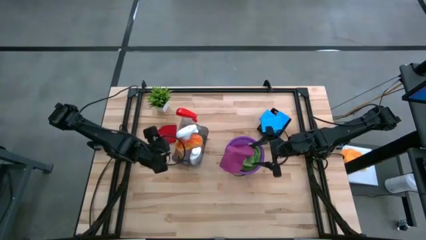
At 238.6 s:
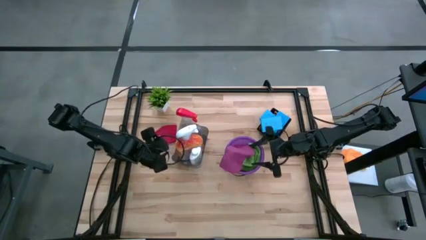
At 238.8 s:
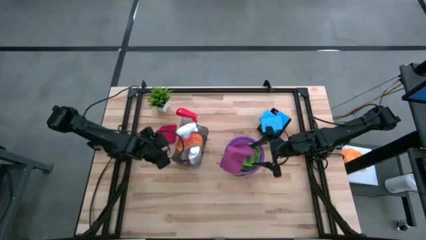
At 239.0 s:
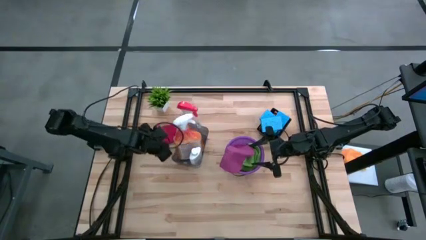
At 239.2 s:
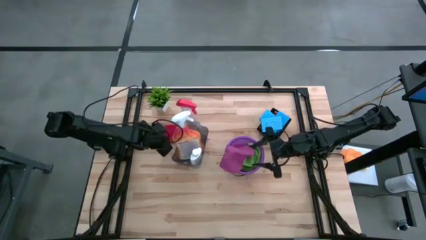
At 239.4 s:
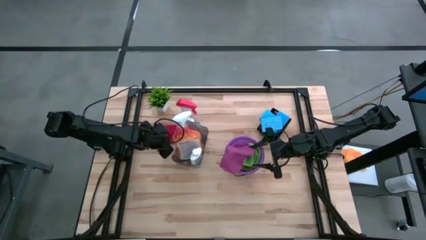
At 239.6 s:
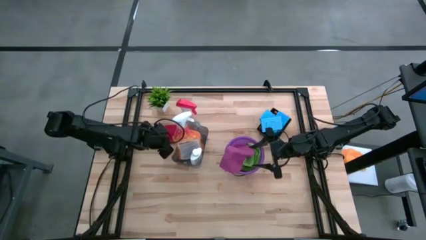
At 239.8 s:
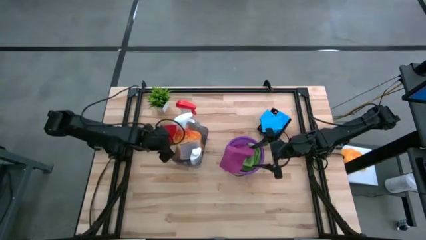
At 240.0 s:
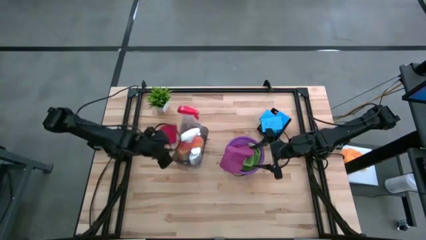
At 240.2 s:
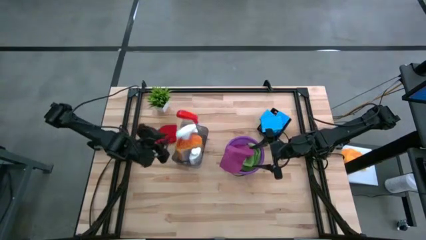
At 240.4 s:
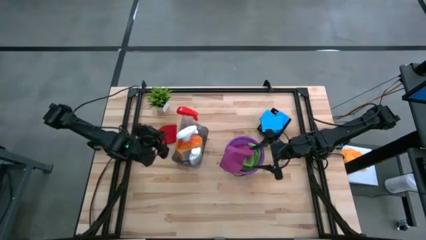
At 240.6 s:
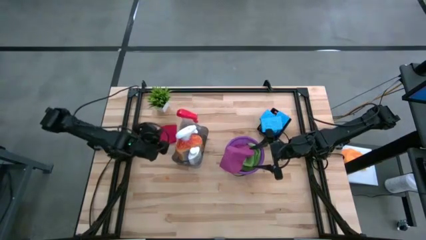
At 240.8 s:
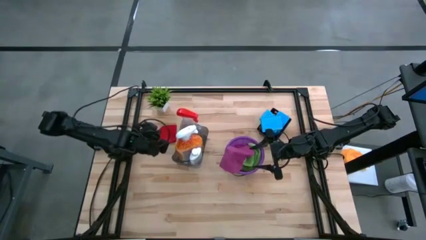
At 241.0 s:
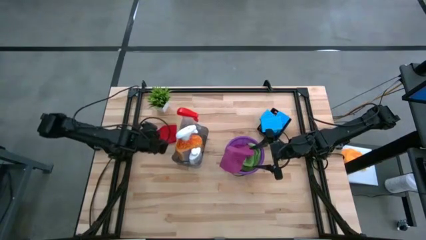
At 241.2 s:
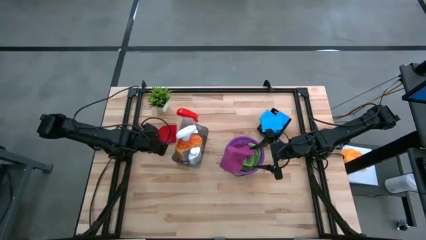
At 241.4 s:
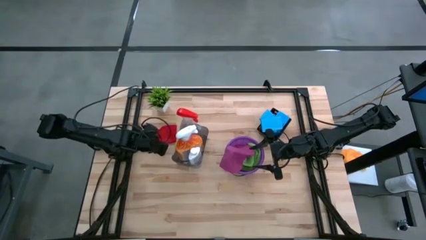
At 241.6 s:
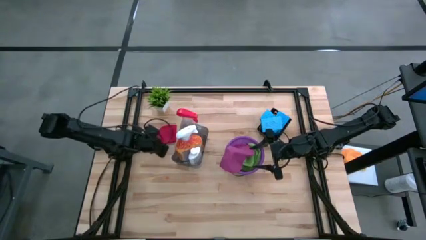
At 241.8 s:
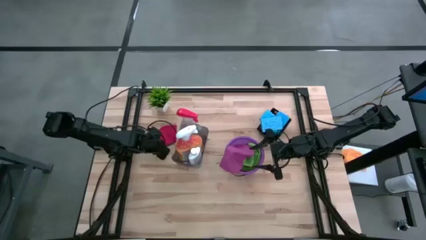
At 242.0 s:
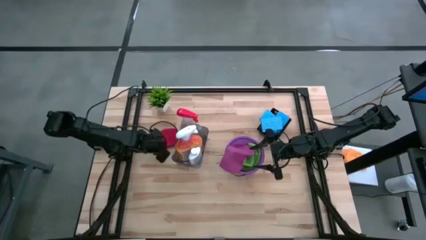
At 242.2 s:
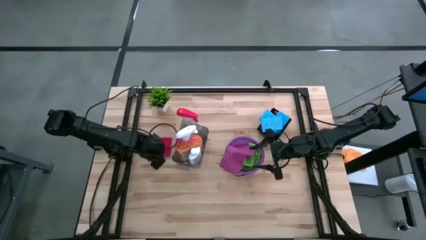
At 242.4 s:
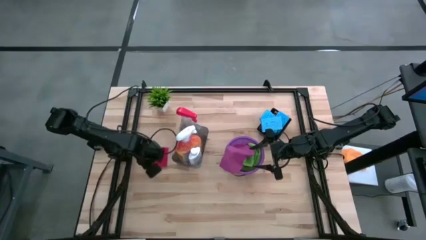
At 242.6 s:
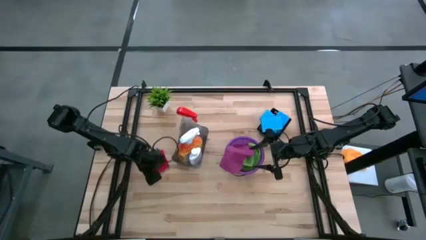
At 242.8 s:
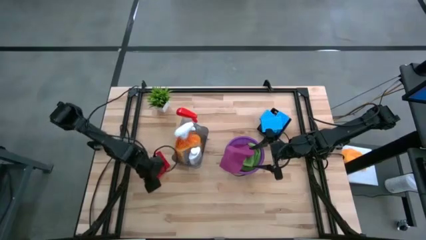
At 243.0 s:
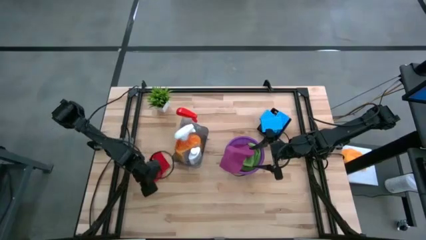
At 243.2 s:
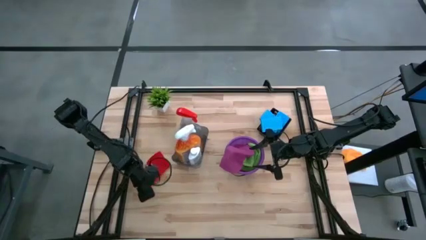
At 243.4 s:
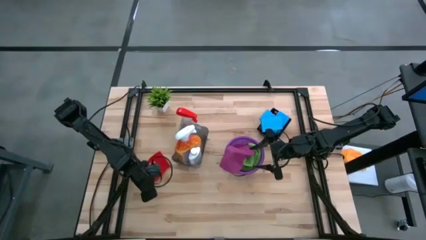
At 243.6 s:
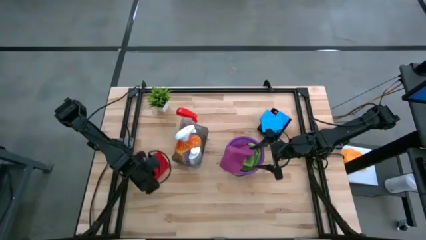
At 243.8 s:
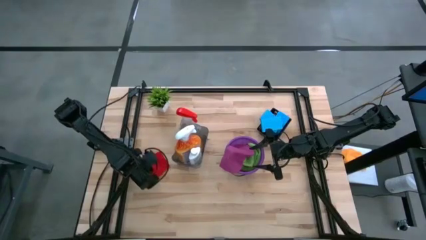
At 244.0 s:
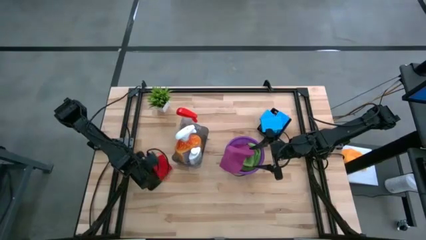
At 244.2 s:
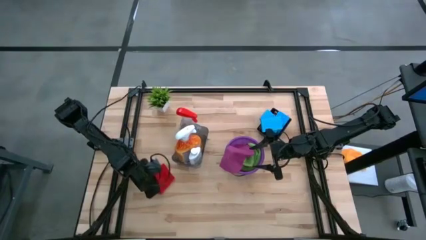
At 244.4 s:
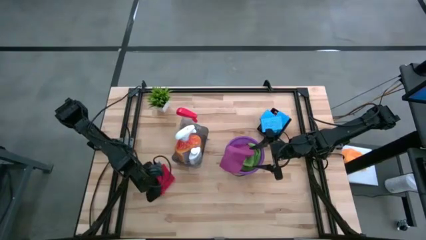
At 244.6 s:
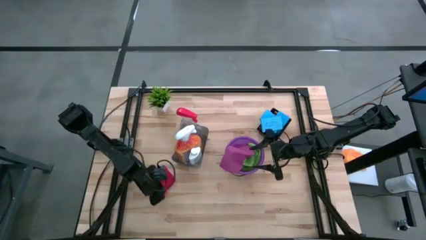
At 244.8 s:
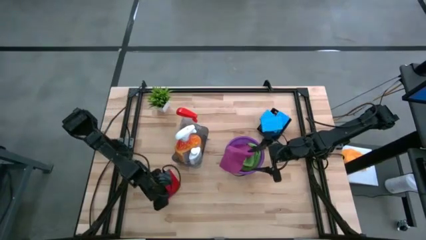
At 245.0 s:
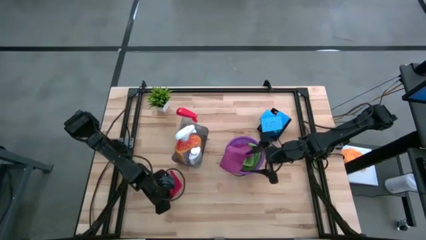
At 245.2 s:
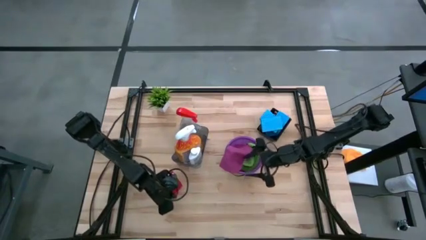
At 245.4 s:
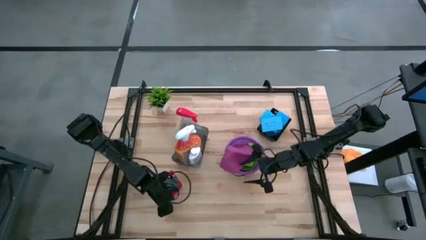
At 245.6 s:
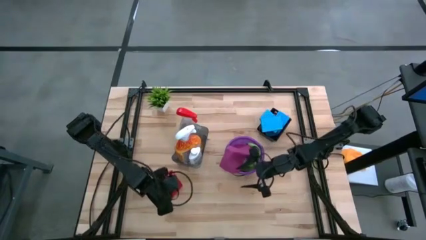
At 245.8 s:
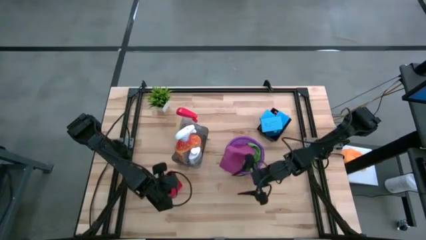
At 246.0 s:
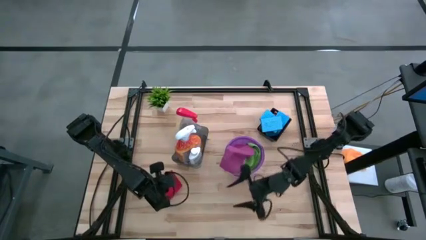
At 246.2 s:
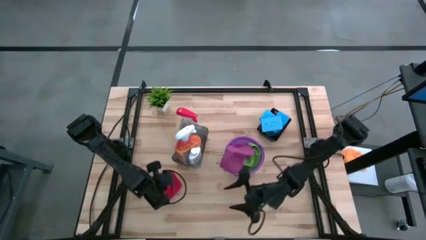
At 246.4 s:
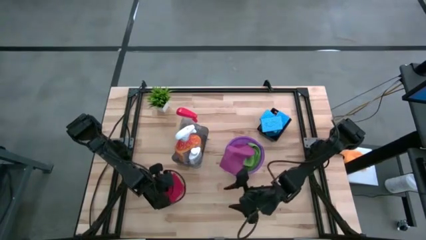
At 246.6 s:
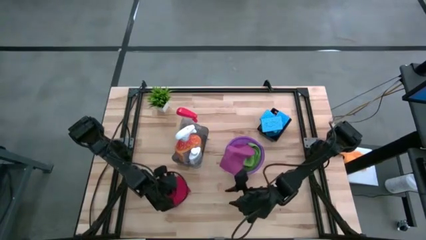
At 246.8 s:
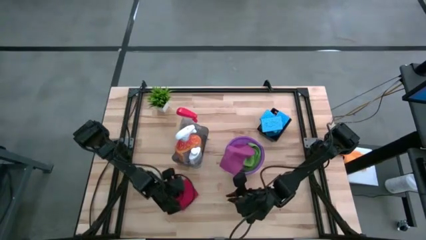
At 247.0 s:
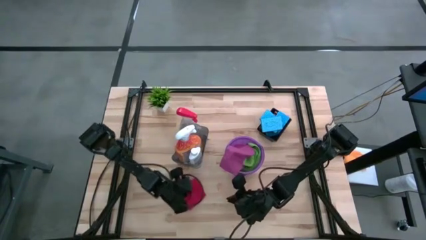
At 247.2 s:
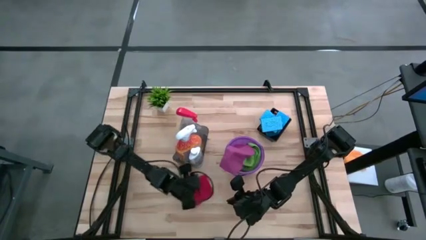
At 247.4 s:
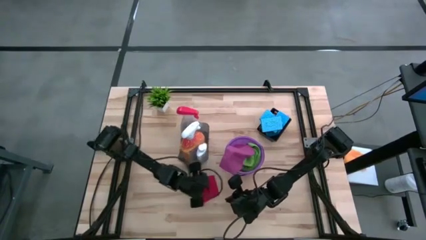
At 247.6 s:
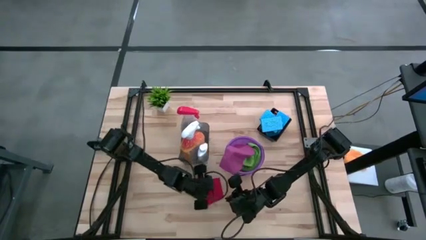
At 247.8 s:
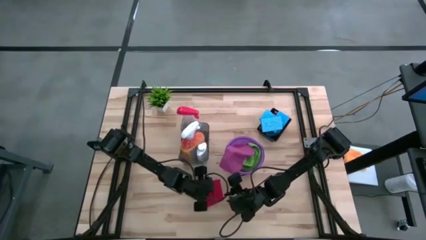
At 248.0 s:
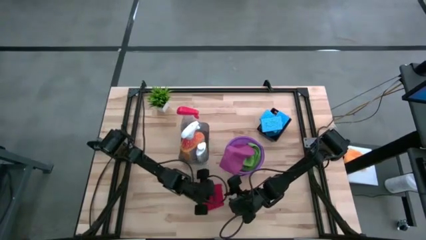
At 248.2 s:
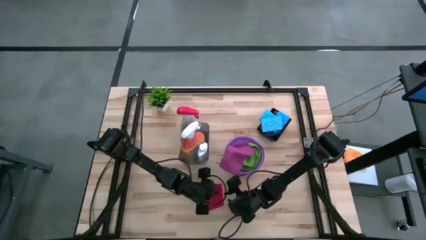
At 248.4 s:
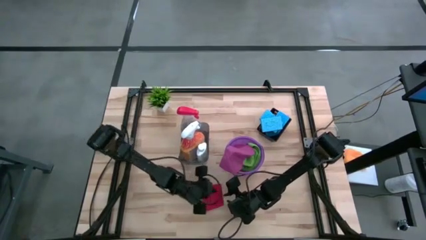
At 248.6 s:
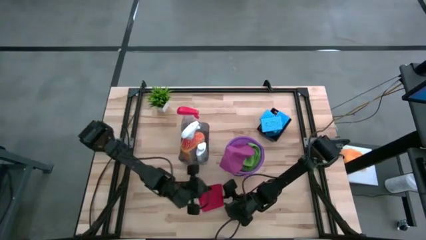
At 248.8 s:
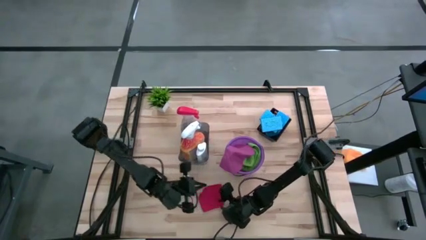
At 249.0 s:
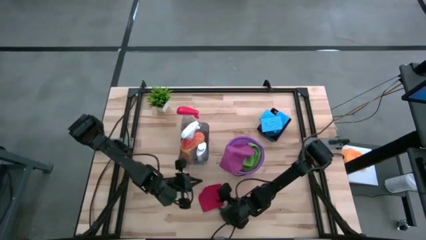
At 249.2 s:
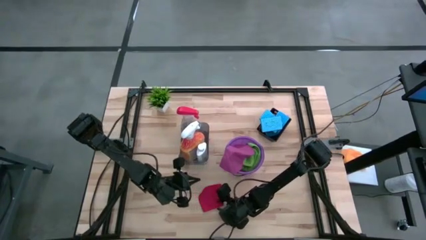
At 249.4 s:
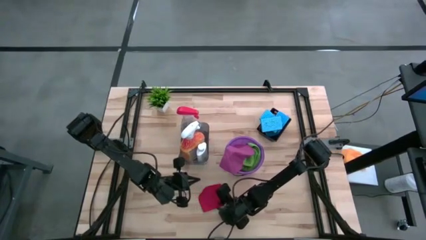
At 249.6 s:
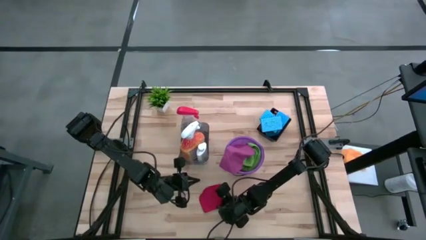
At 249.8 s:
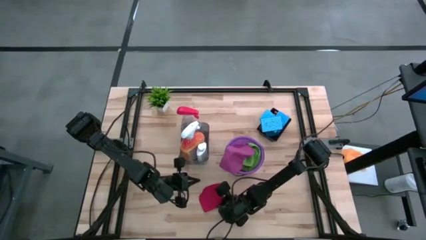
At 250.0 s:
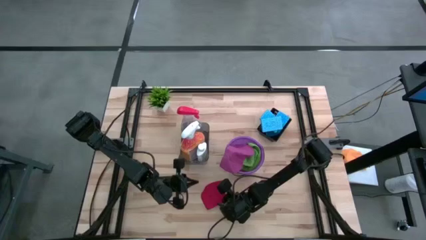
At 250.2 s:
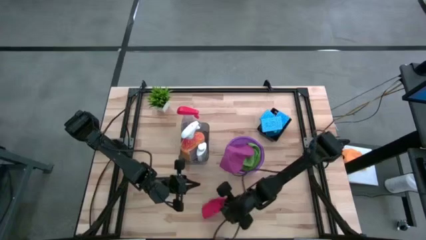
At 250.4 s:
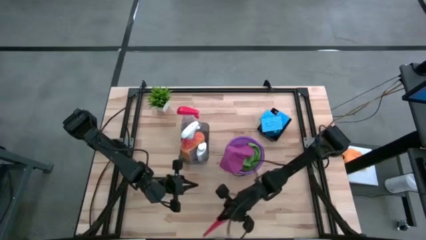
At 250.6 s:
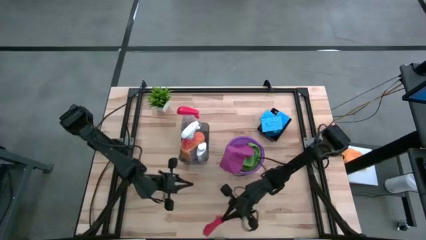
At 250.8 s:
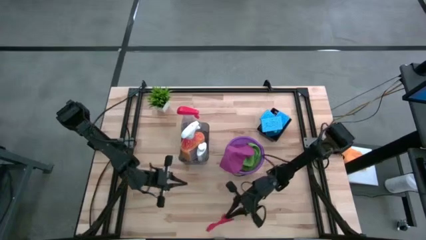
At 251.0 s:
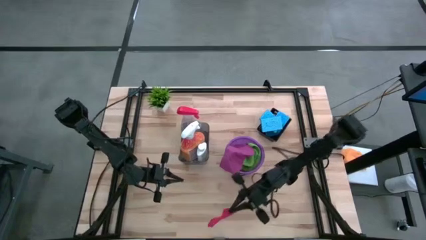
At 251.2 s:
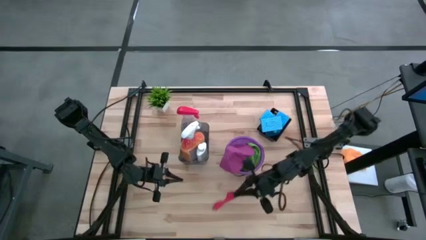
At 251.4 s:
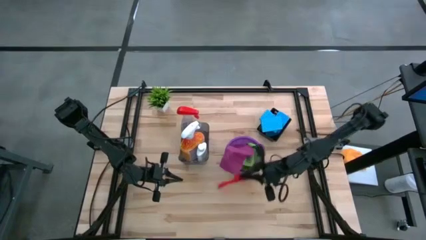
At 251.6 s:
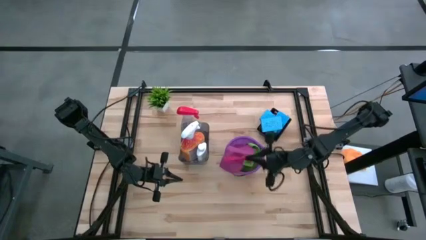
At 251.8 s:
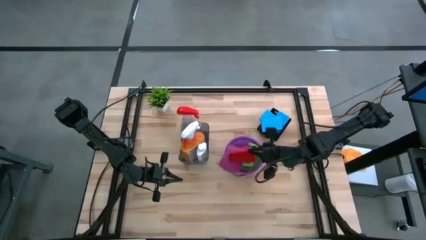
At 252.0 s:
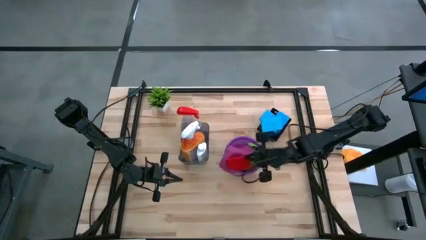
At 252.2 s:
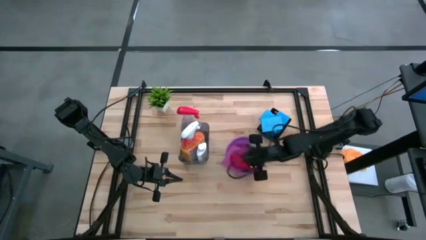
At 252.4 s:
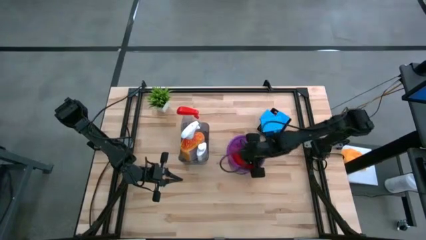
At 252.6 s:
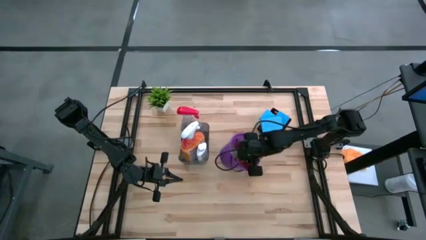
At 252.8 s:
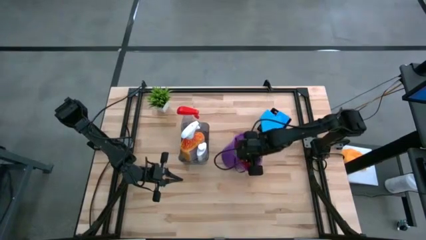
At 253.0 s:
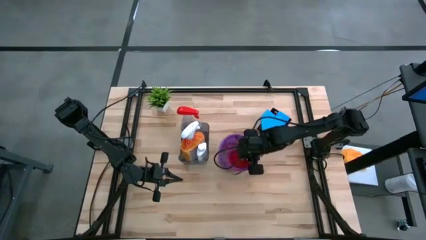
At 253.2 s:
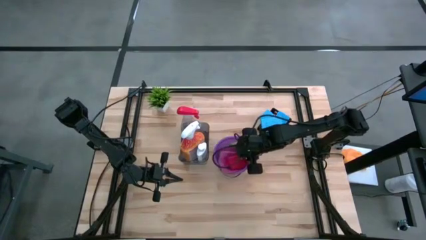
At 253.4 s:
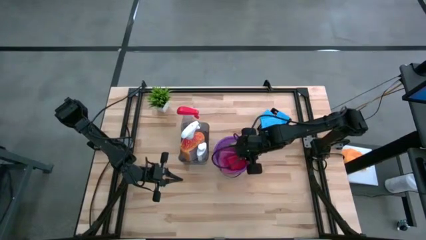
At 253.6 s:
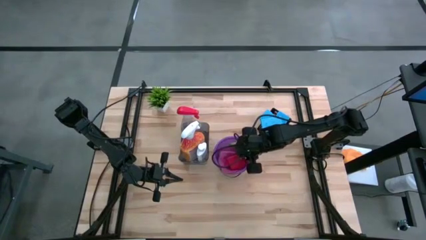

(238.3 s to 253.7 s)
Task: Pick & Place Kitchen Items
Put the red microfiber cloth into the purple bucket

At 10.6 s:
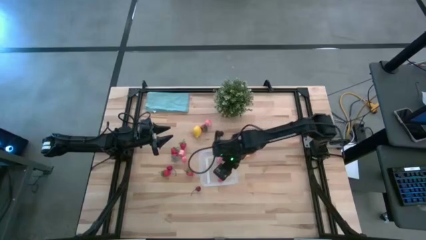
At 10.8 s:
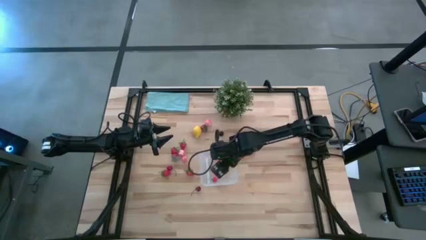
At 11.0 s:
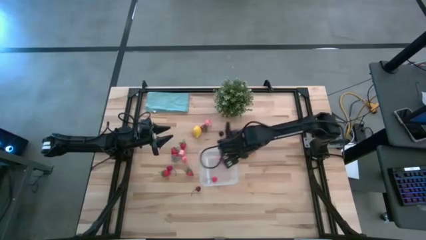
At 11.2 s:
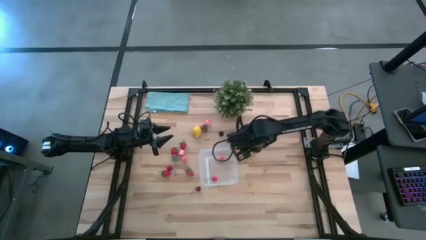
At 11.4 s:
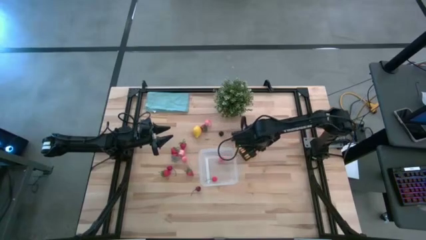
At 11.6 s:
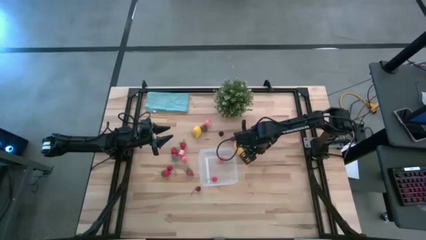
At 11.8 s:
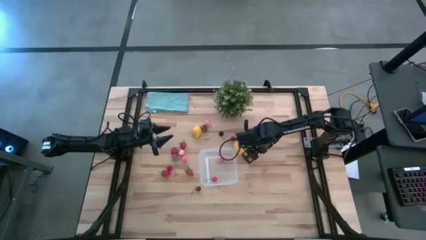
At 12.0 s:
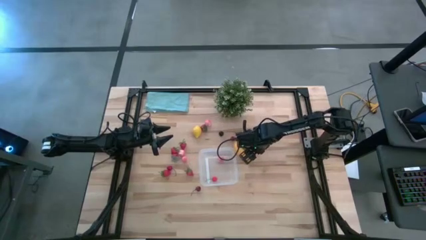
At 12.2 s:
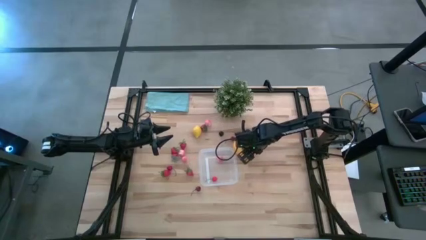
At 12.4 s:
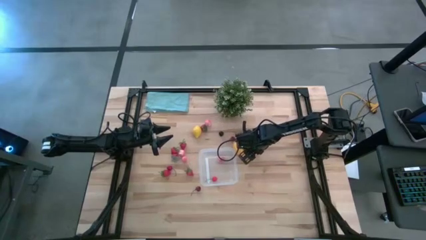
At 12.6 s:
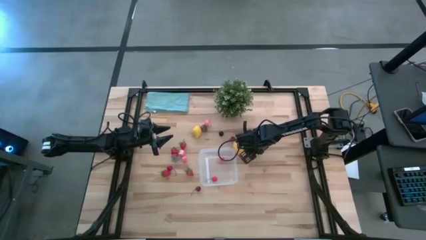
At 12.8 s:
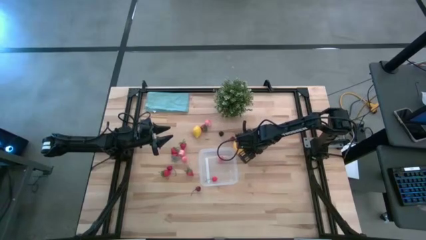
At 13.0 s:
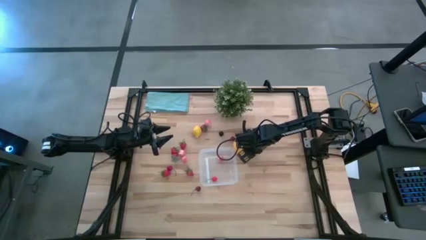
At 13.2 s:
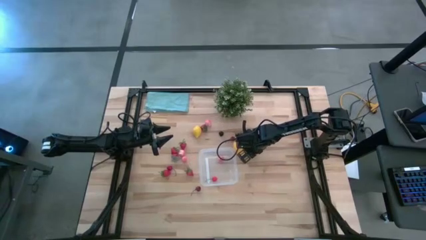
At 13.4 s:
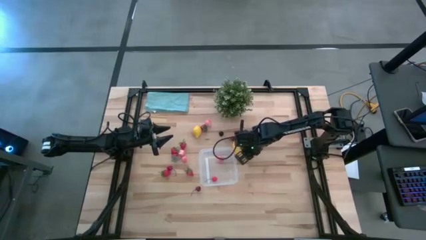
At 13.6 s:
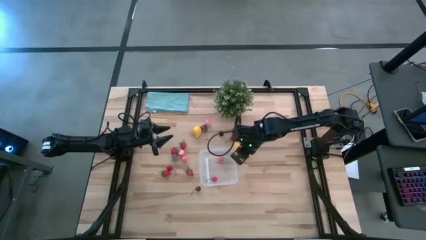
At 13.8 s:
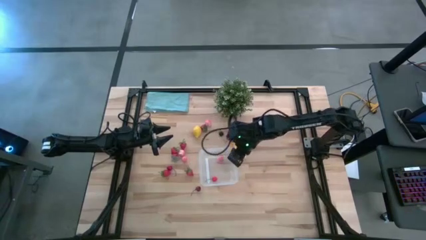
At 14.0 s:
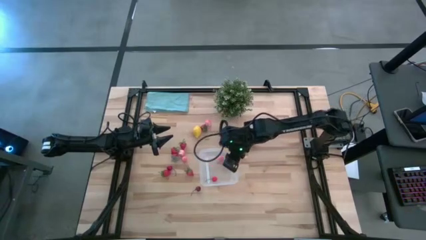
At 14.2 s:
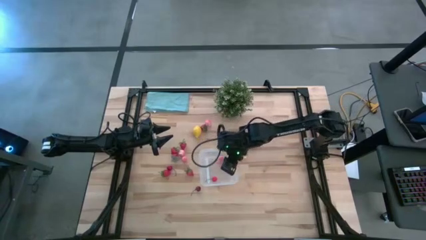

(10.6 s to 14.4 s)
Task: Pick and placing Produce into tupperware
Put the pink peach into the transparent bin
